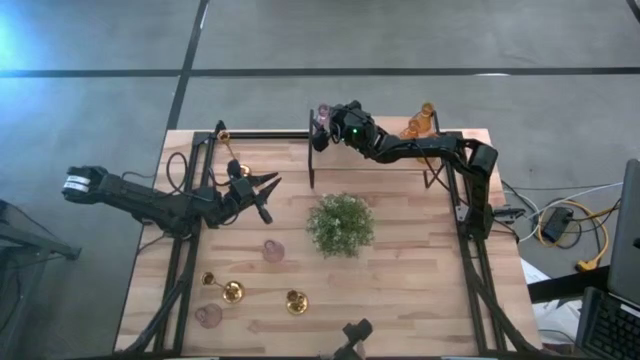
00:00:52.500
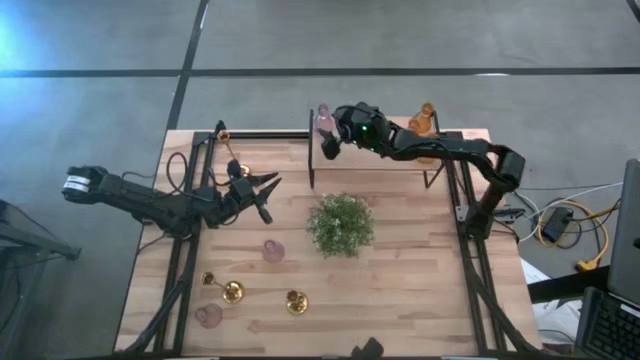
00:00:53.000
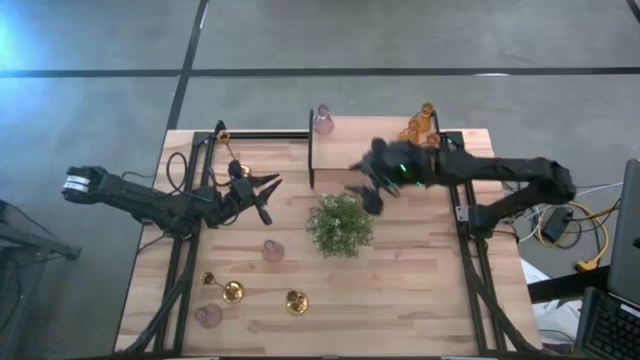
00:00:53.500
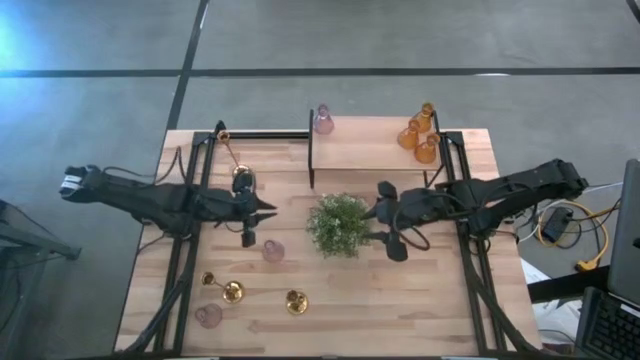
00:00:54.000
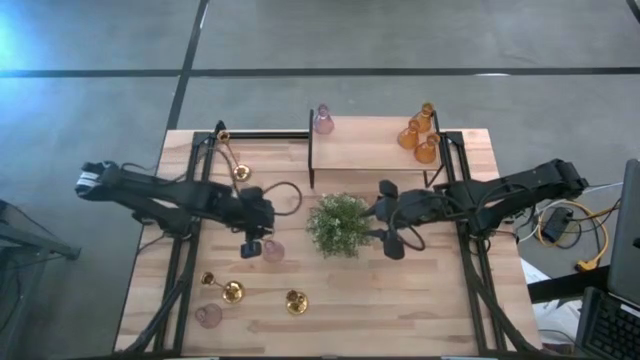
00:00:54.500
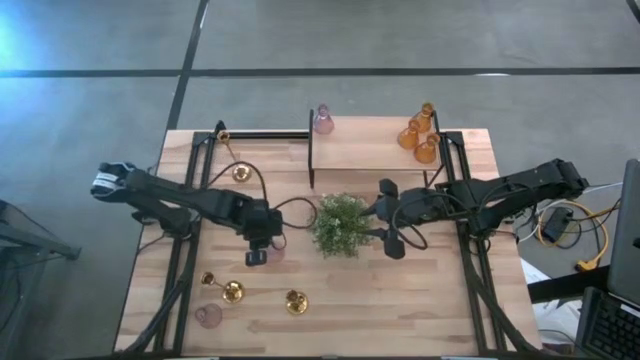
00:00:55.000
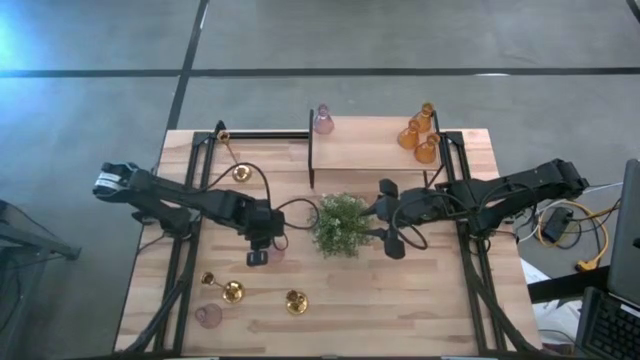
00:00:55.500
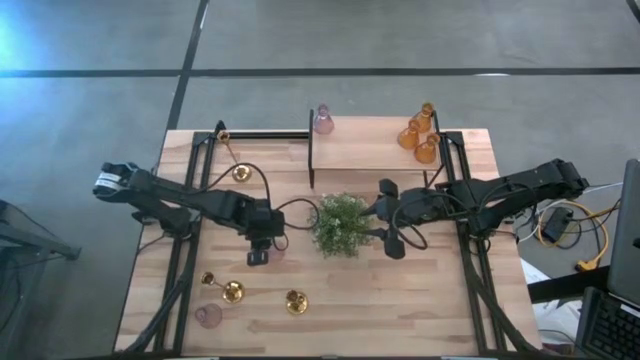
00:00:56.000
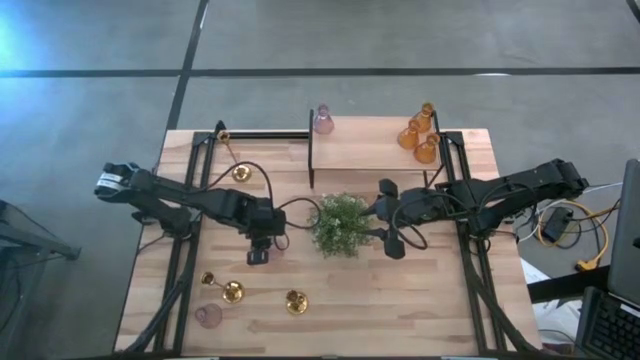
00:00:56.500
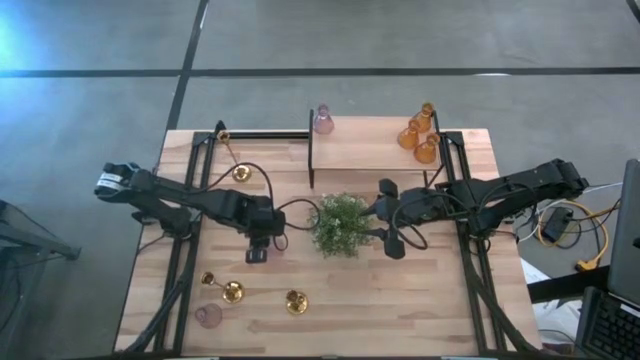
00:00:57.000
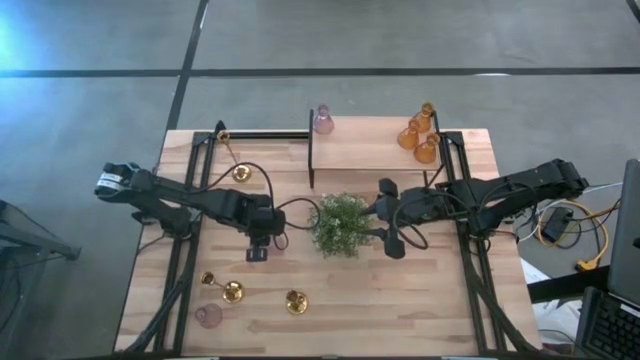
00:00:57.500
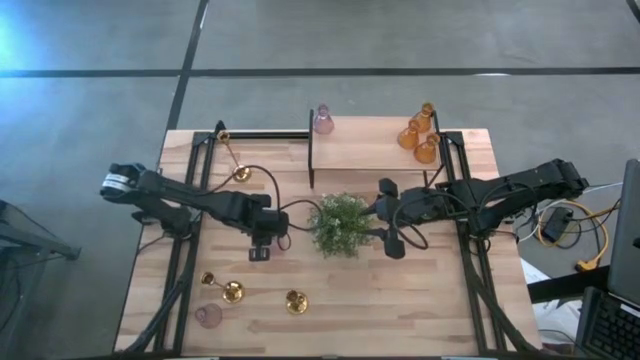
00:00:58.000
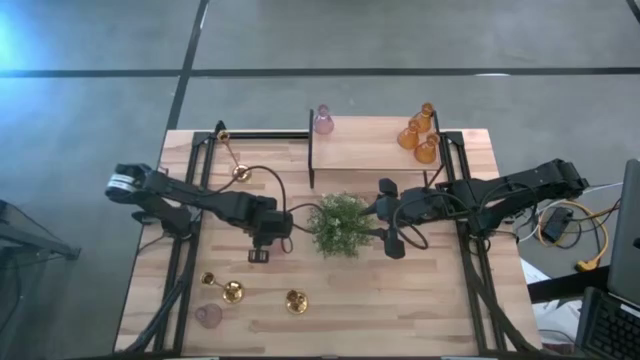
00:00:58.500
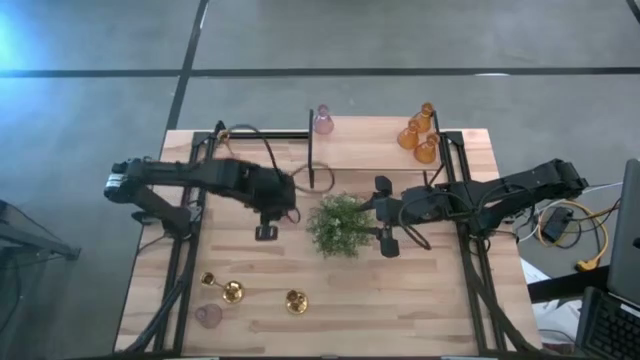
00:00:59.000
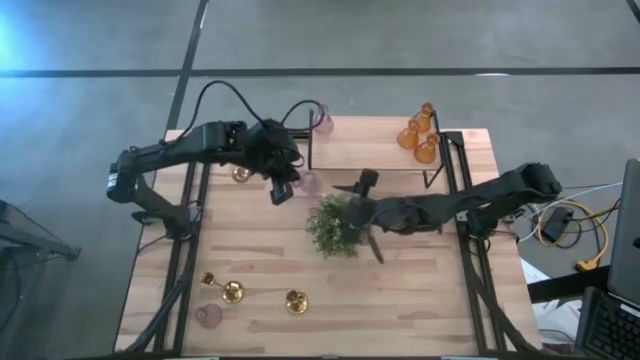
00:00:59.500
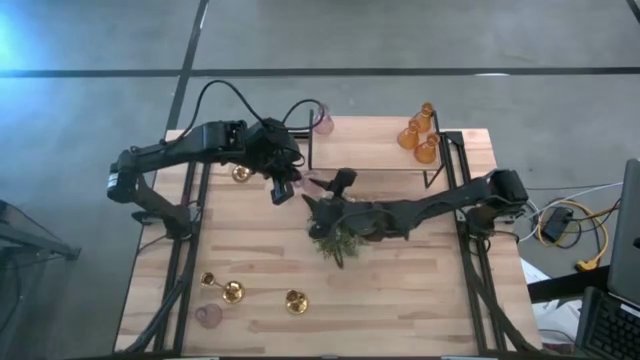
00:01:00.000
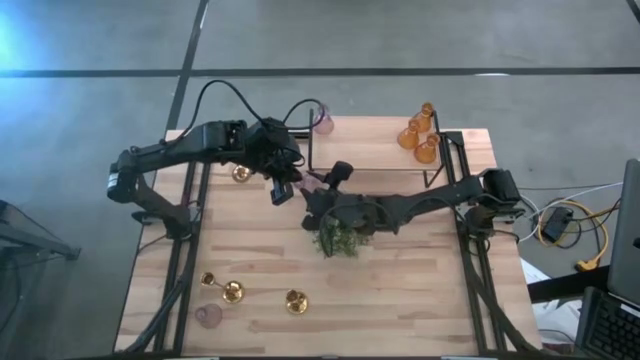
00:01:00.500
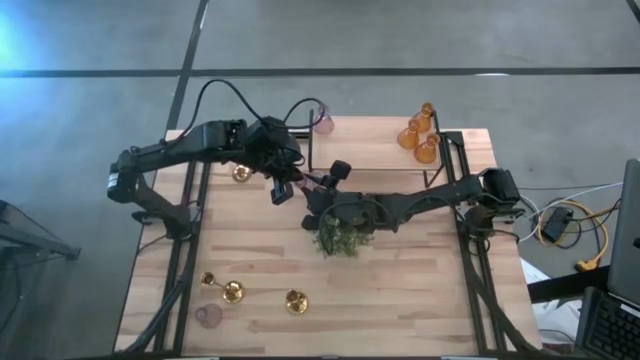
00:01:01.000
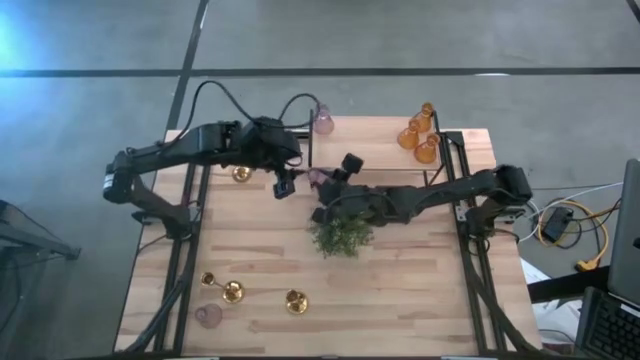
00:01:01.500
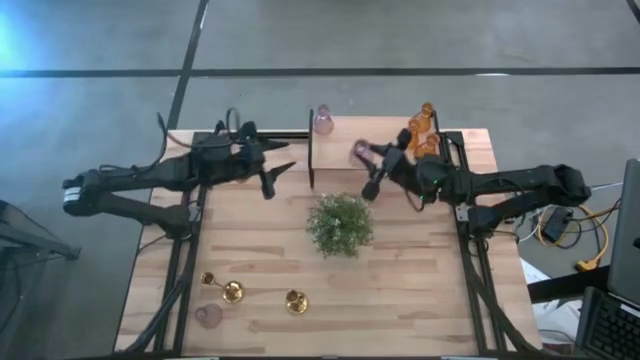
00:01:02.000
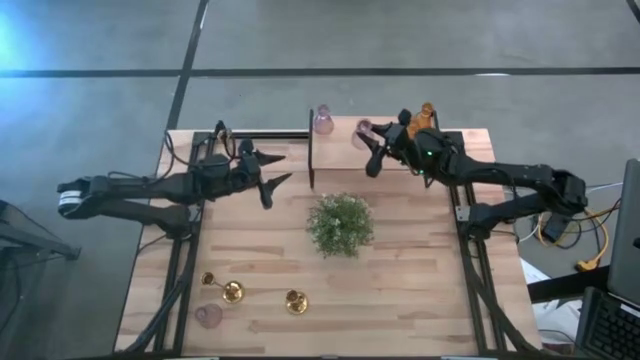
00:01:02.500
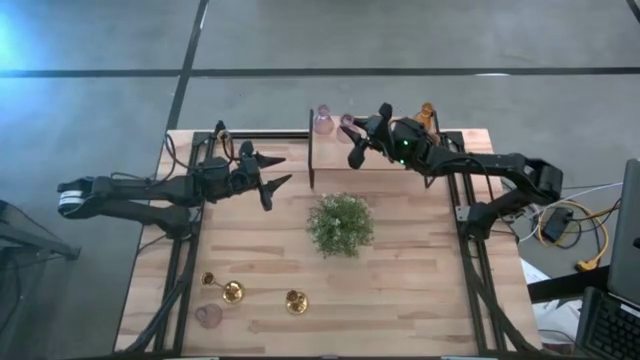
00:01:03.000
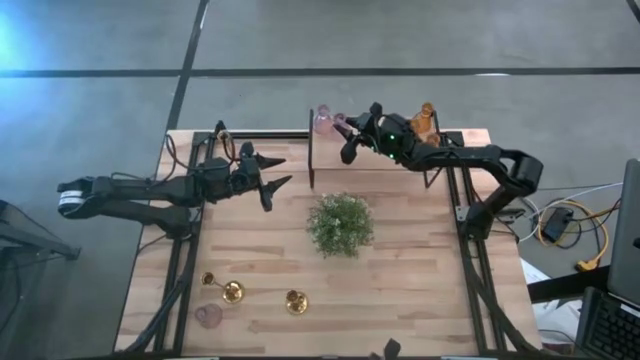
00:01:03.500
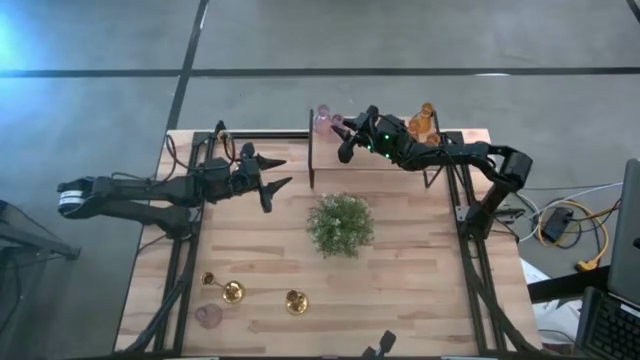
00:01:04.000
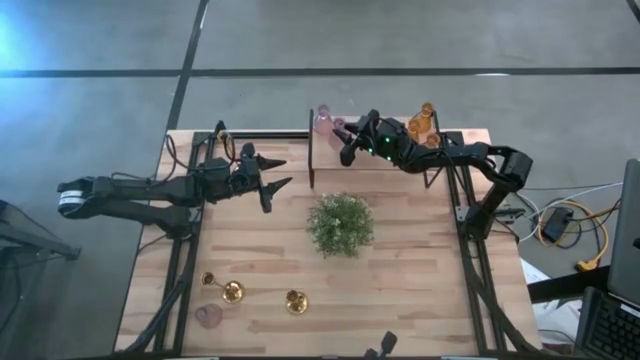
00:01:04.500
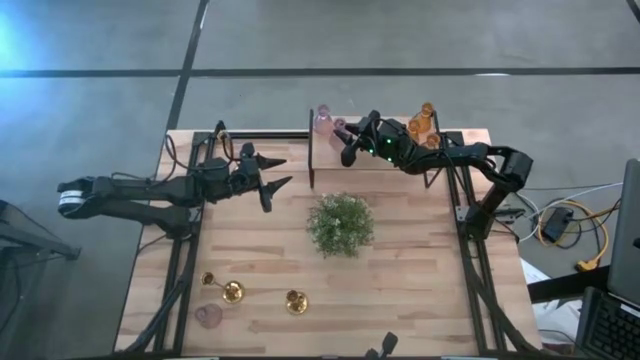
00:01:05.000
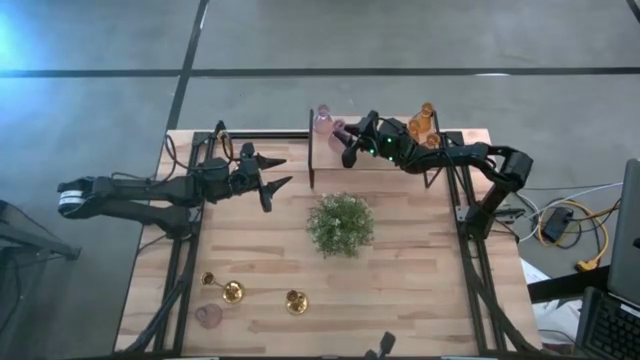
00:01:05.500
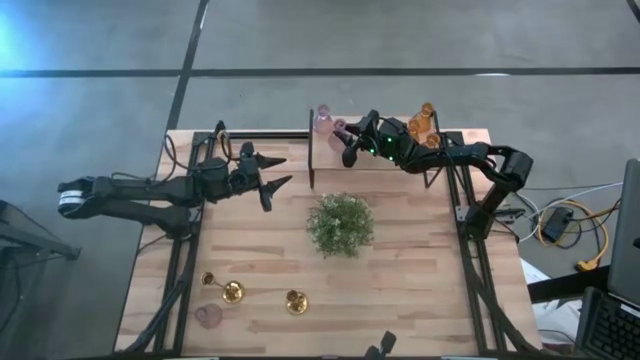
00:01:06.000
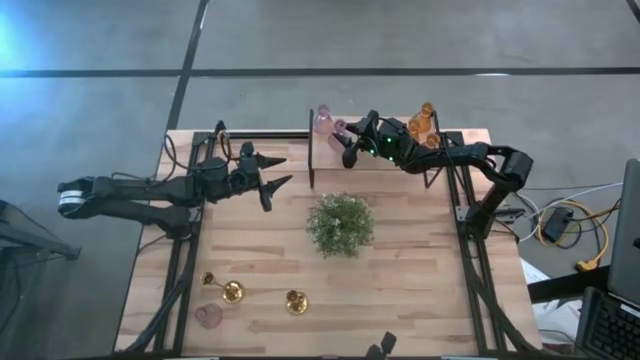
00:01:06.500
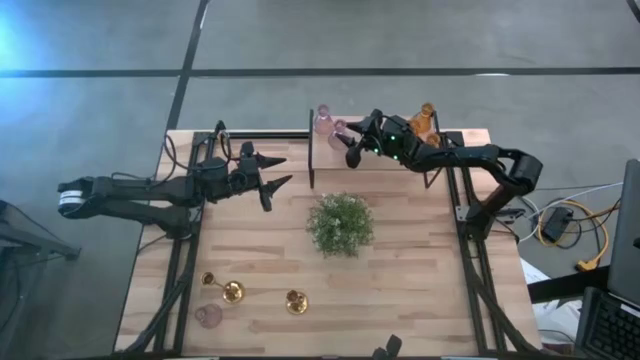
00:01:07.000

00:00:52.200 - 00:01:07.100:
Task: Pick & Place candle stick holders
Put the middle pink candle holder on the shelf

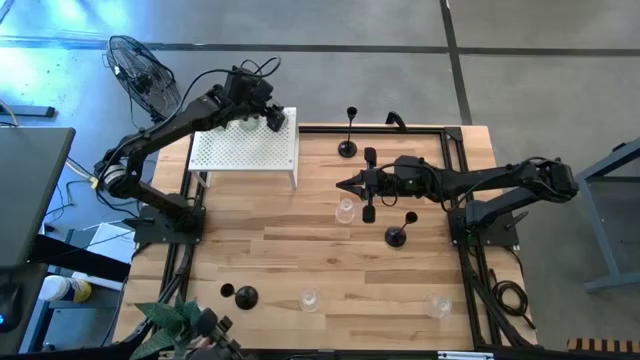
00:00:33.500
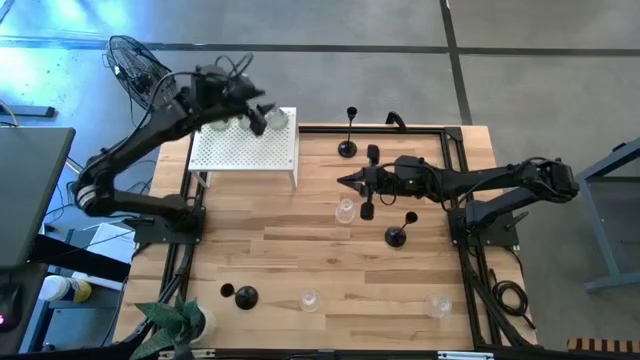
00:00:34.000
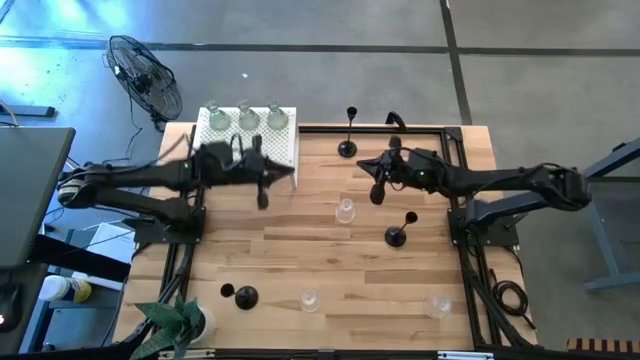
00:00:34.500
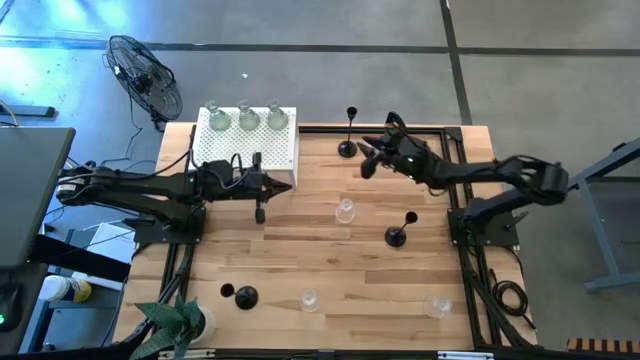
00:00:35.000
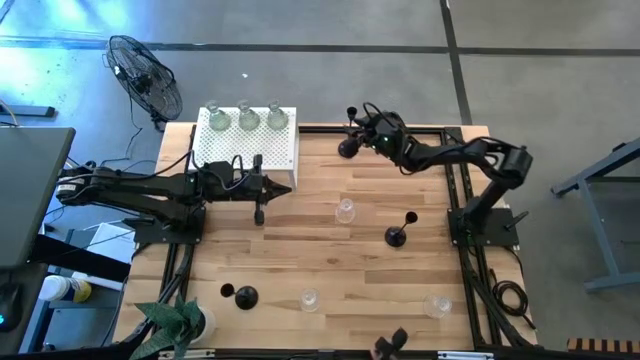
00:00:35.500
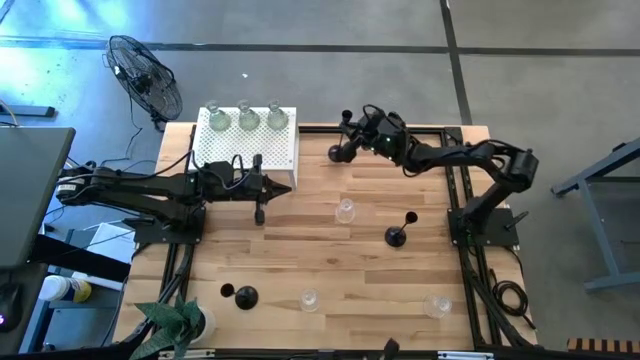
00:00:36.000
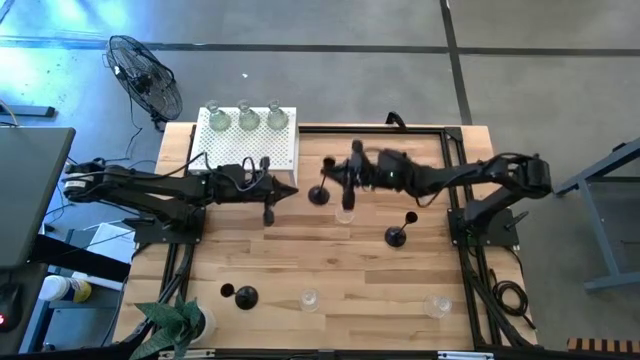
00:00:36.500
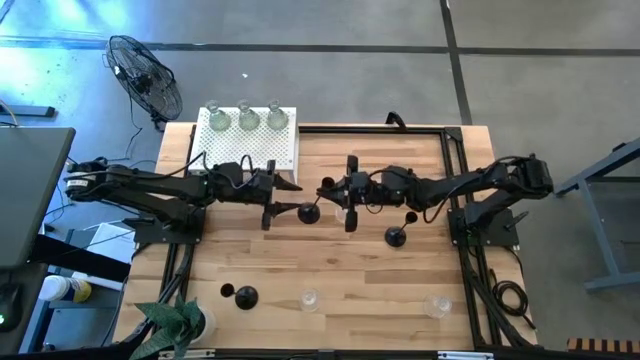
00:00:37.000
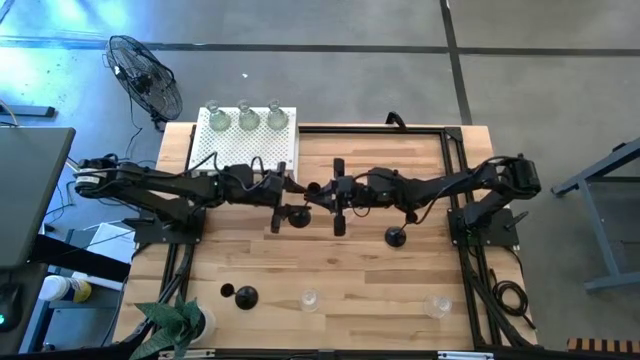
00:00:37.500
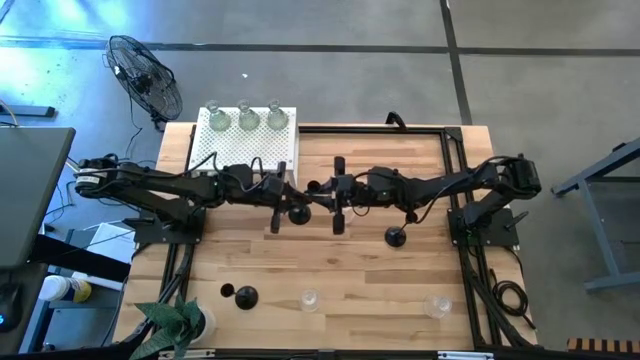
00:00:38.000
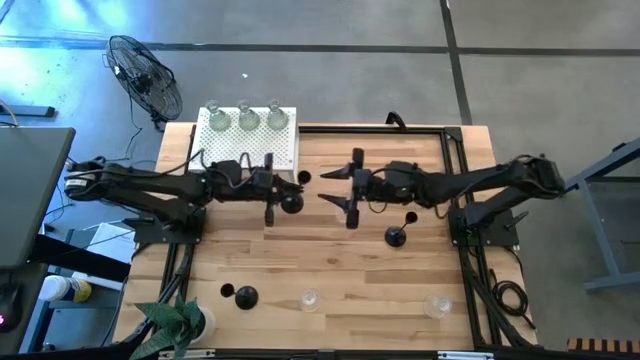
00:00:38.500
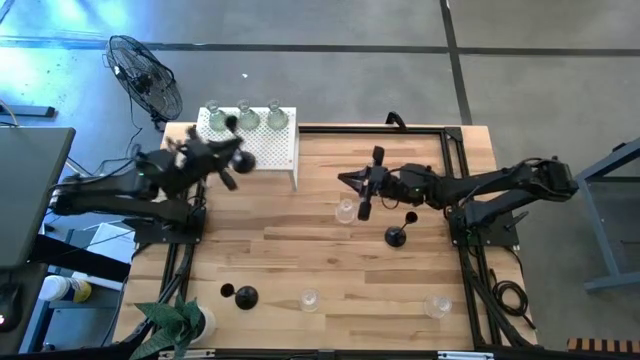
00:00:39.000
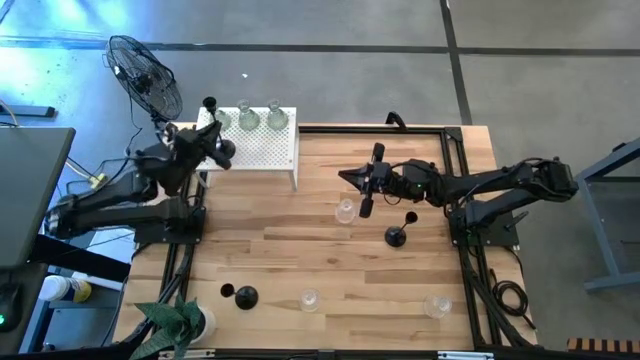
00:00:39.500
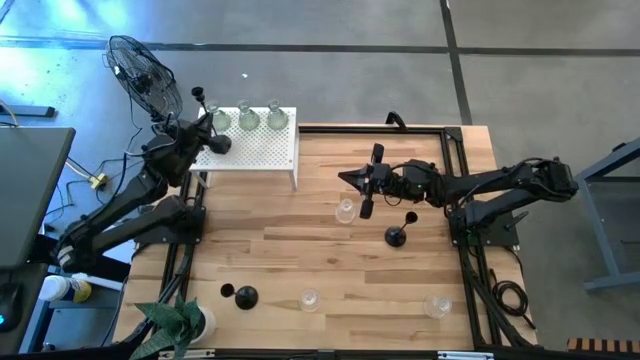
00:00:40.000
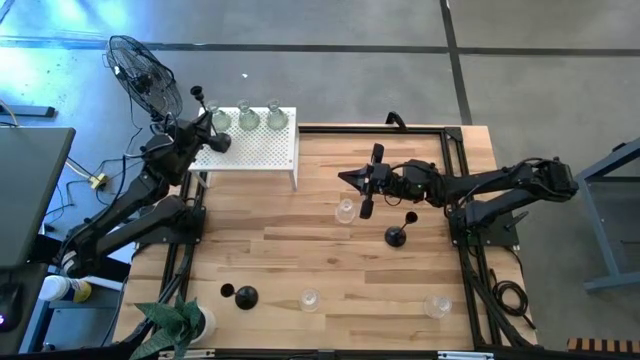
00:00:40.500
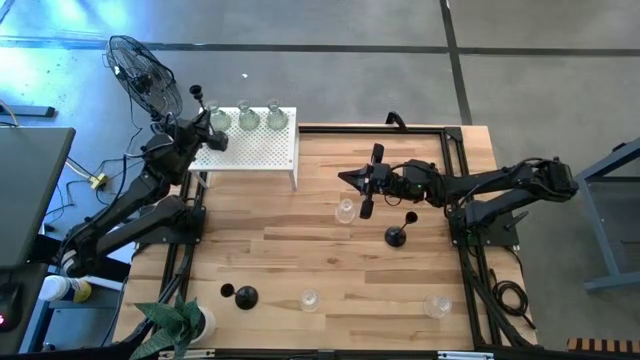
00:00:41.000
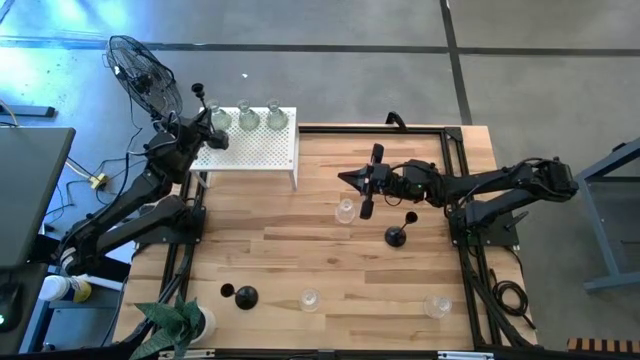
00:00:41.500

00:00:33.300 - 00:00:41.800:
Task: Pick & Place candle stick holders
Put the top black candle holder on the shelf below the green candle holder
